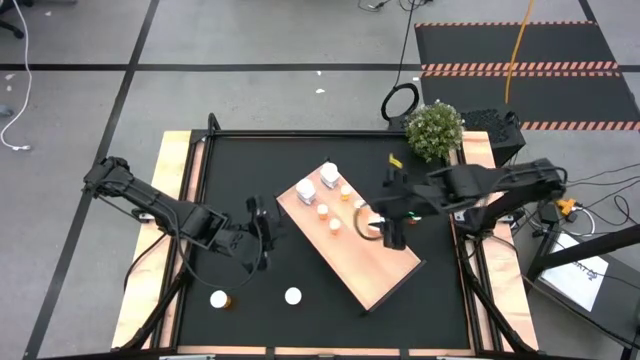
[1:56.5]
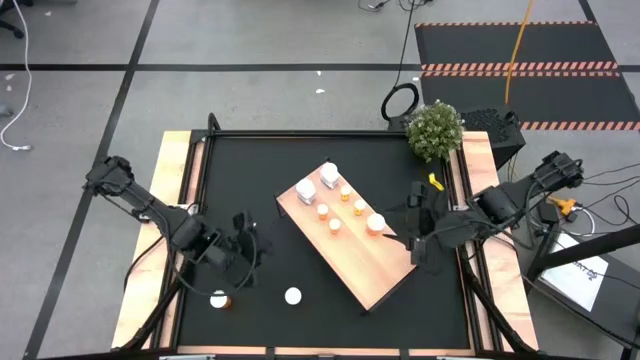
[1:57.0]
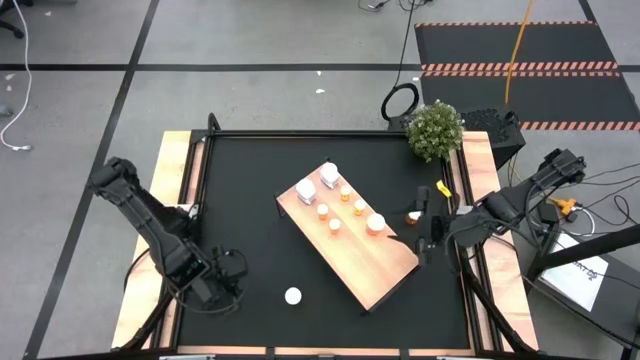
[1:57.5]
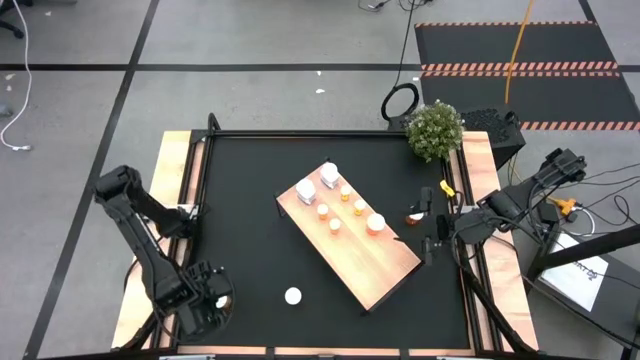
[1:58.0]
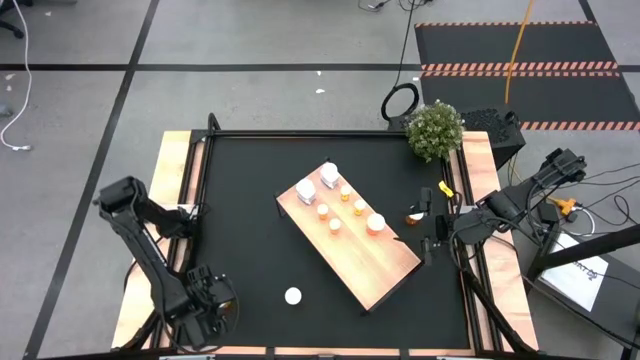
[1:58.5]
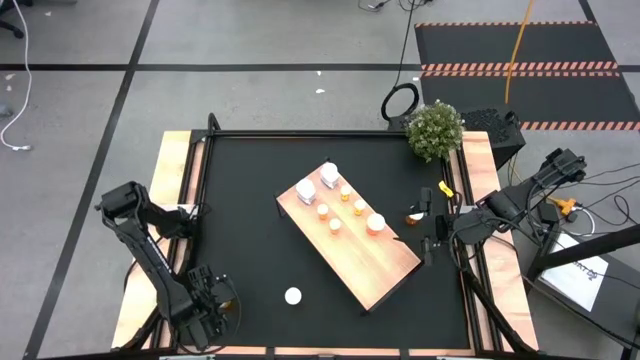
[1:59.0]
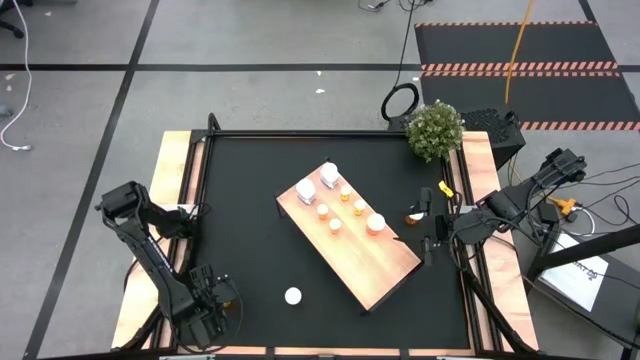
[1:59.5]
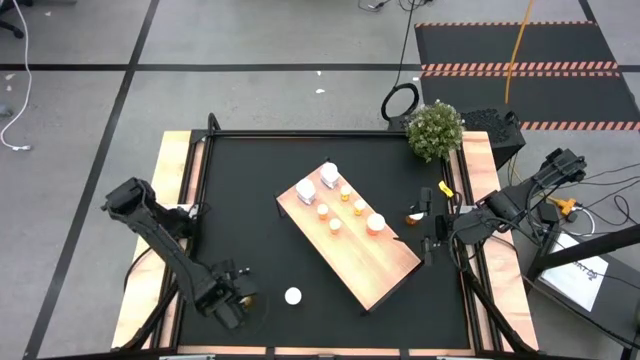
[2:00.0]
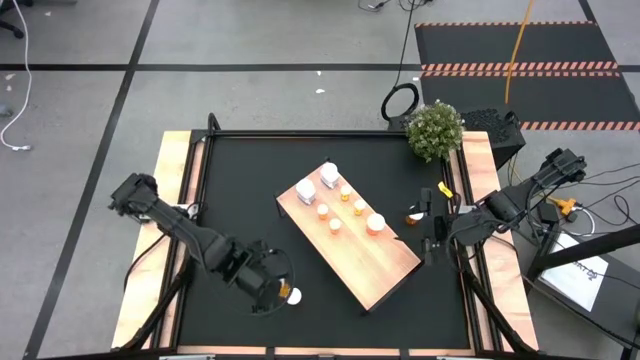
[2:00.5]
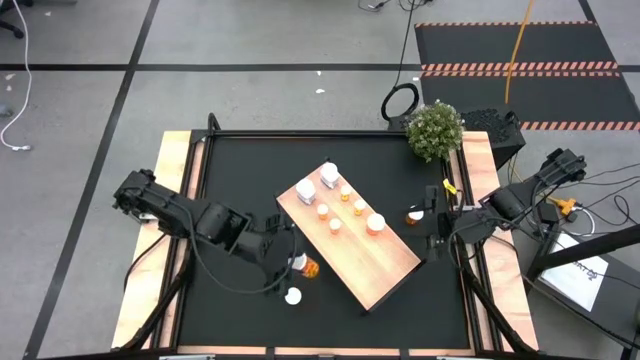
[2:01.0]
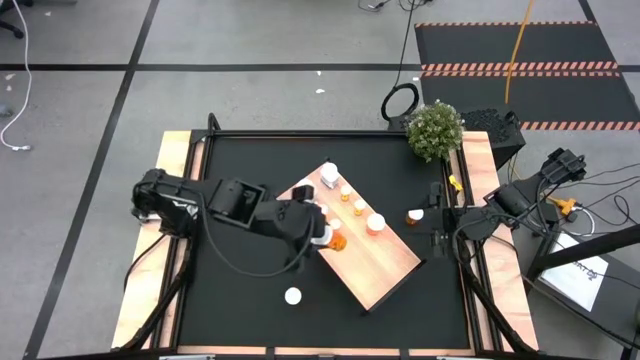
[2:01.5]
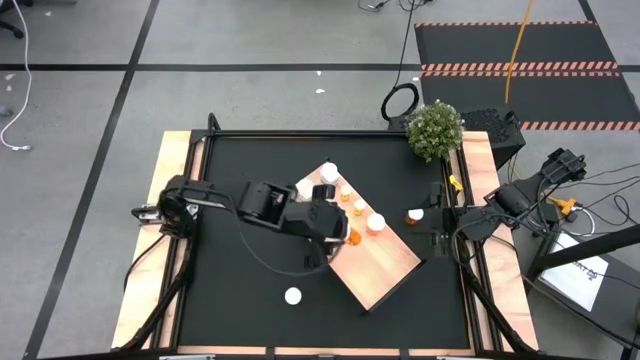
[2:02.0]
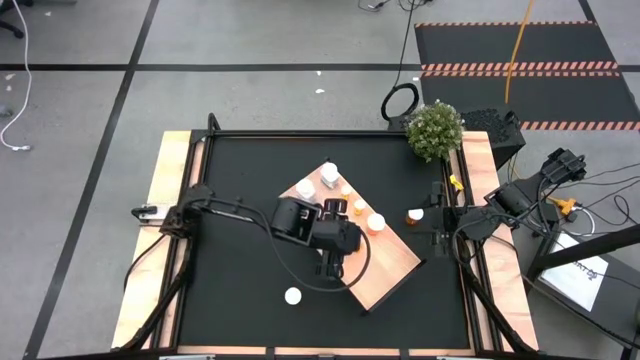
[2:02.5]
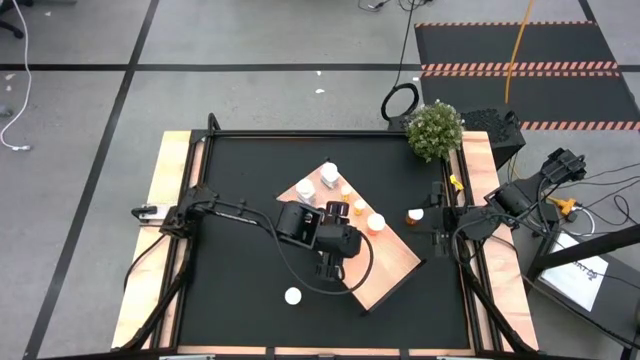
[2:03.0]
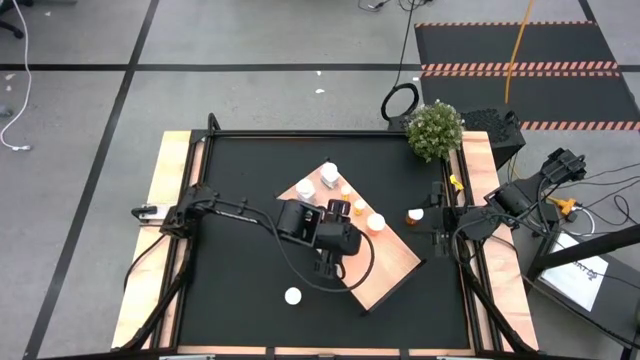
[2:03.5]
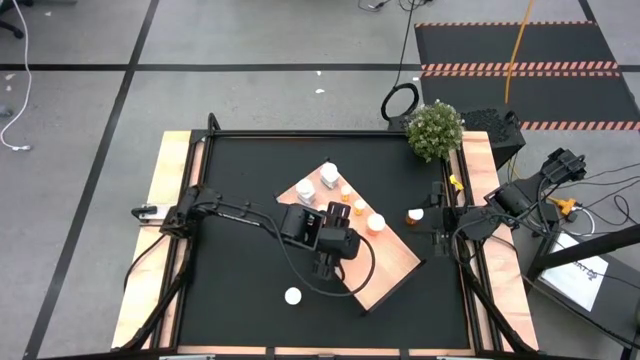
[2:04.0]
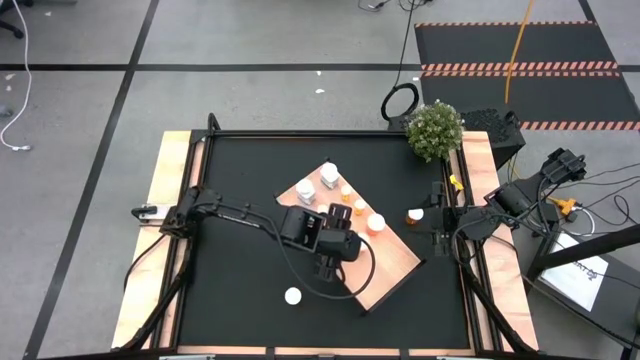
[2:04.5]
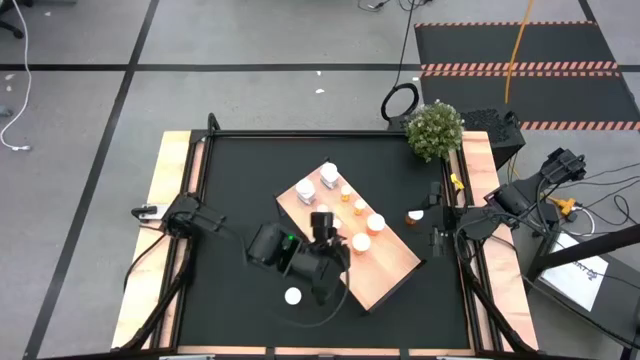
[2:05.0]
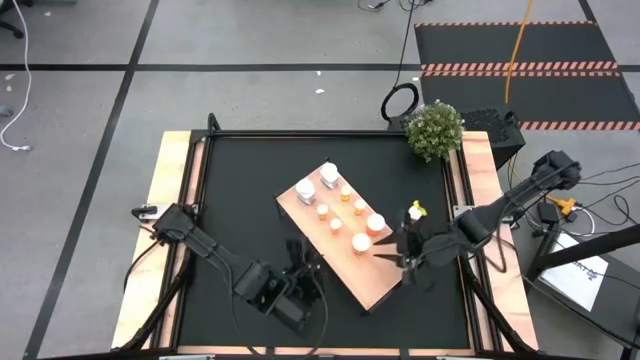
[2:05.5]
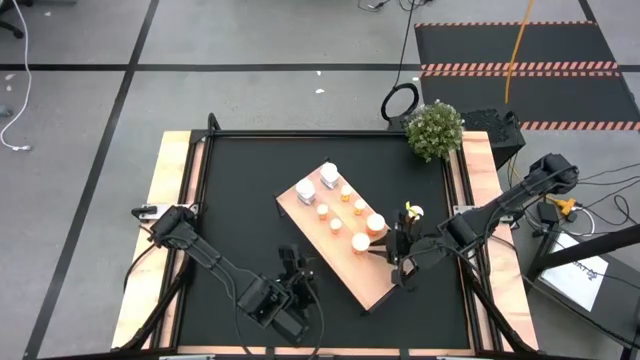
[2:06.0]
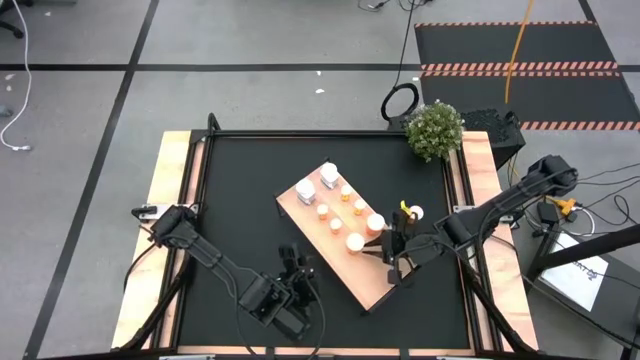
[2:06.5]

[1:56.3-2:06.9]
Task: Pick and place medicine bottles onto shelf by color
Put the large orange pill bottle on the shelf aligned with the other large orange pill bottle

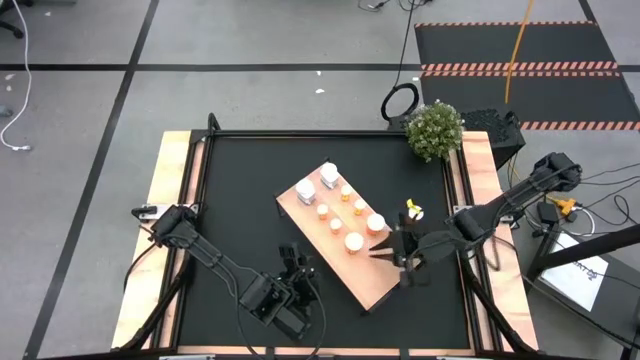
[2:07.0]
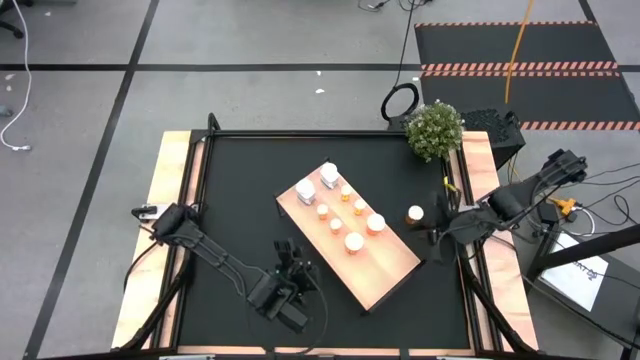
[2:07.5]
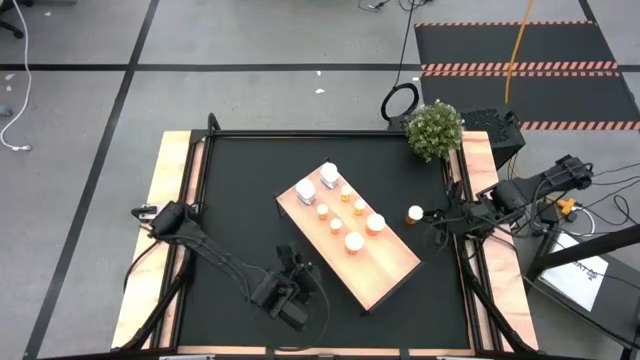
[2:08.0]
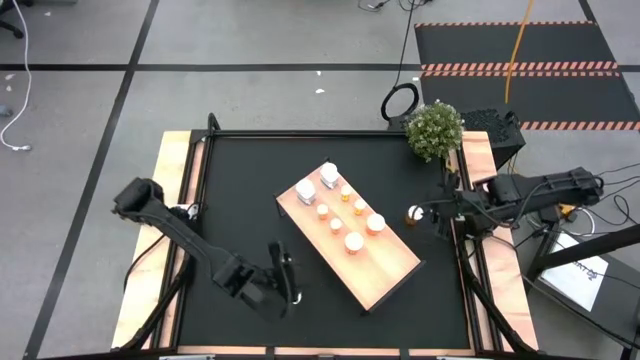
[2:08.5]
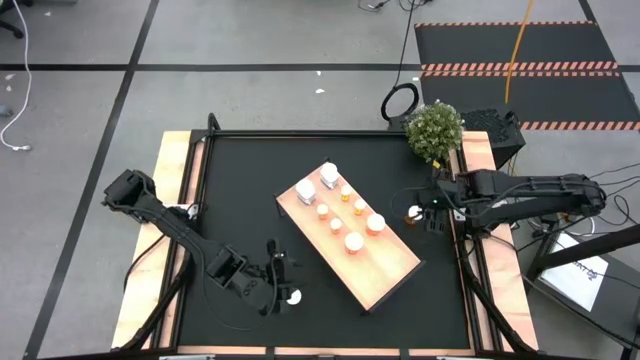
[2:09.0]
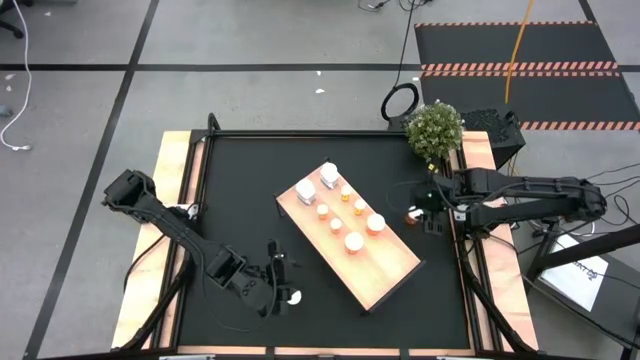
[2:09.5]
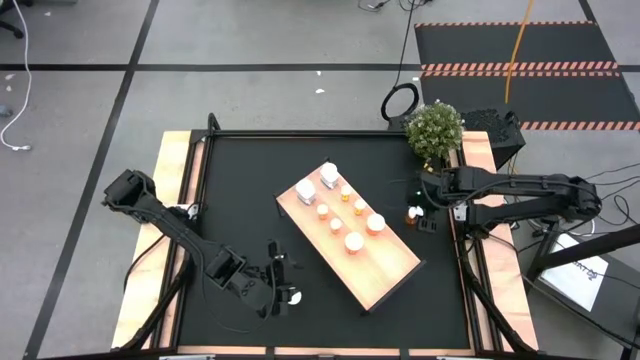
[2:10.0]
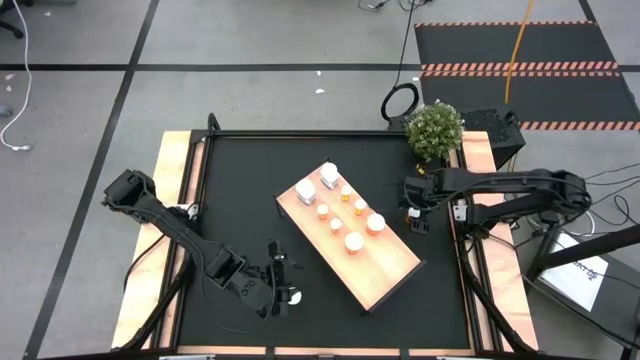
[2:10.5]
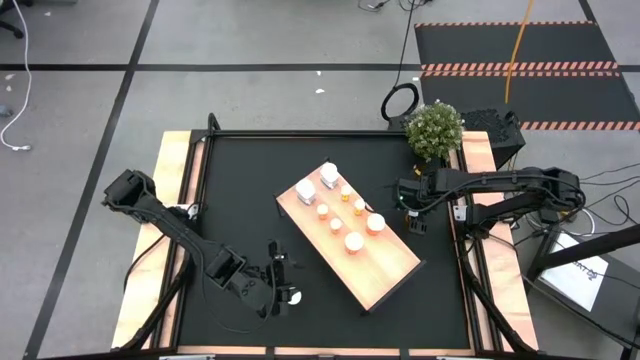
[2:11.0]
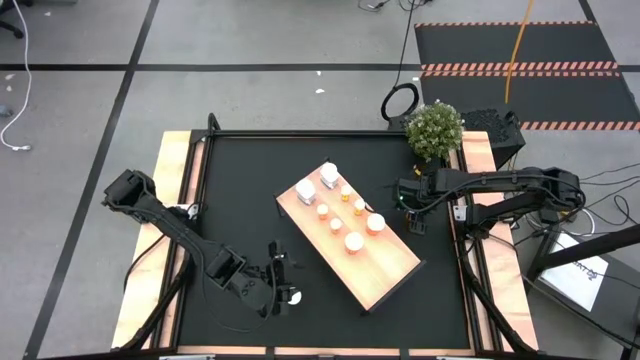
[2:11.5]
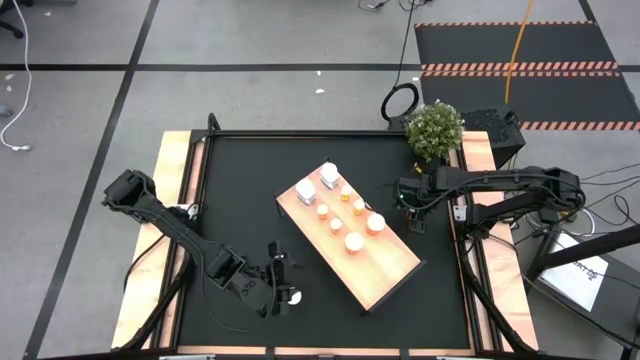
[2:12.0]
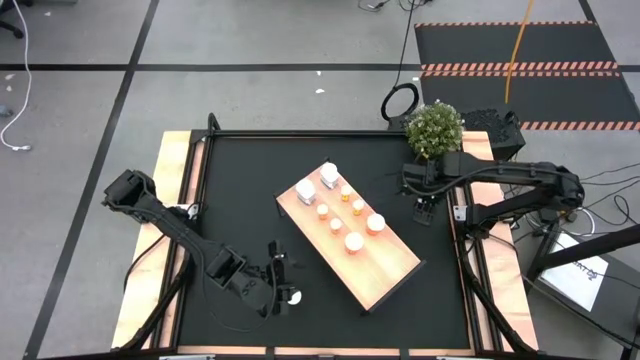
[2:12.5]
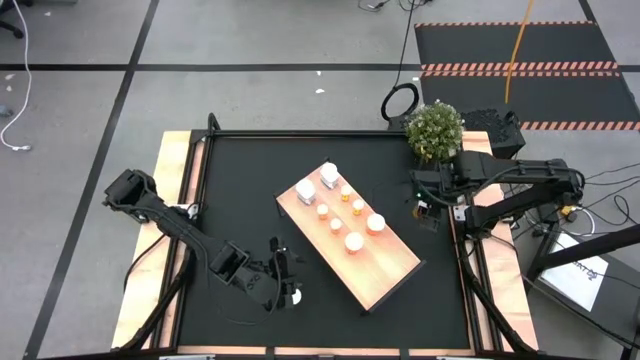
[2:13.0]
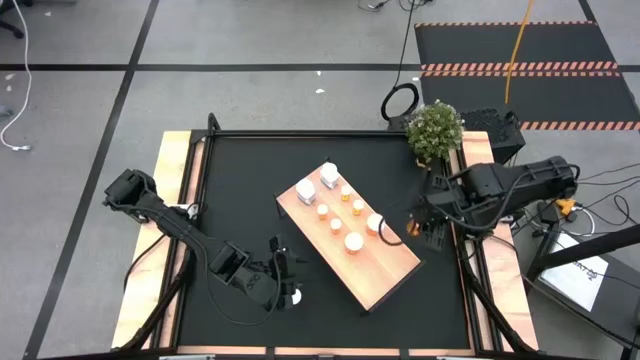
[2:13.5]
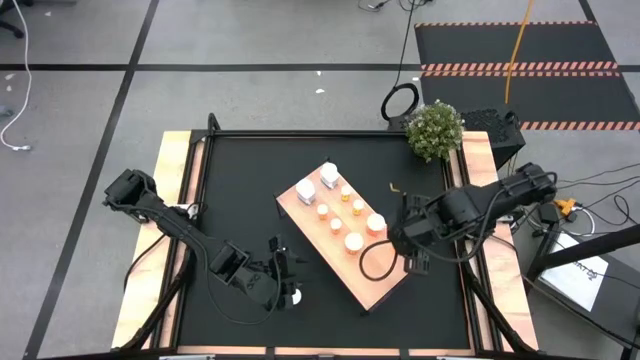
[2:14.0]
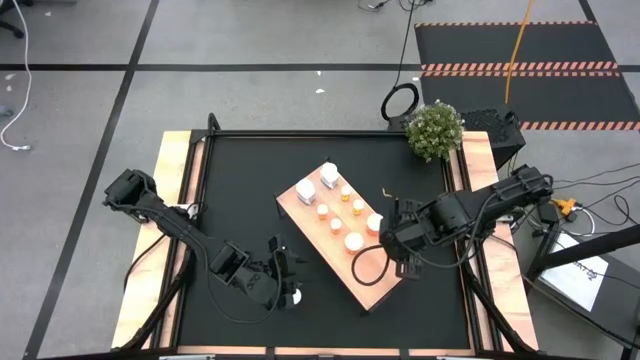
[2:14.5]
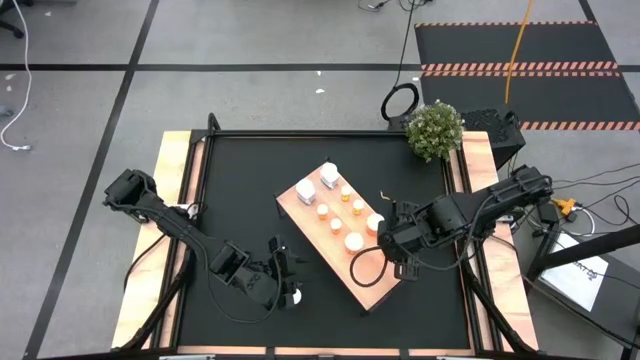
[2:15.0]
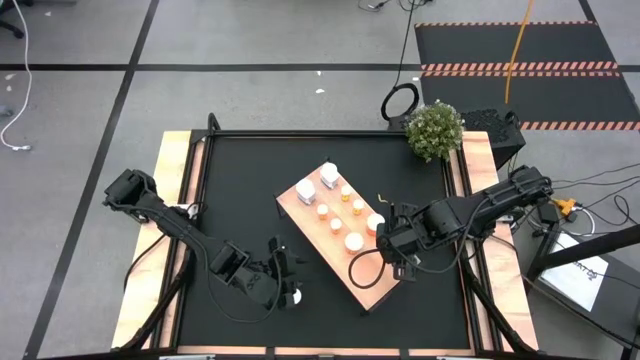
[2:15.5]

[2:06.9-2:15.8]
Put the large orange pill bottle on the shelf aligned with the other large orange pill bottle
